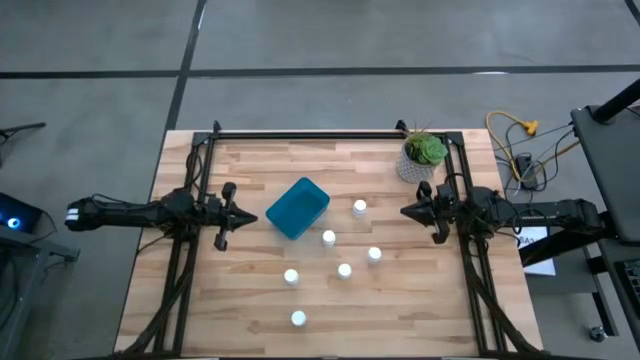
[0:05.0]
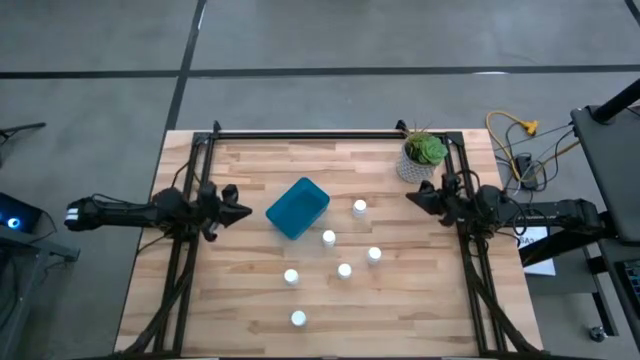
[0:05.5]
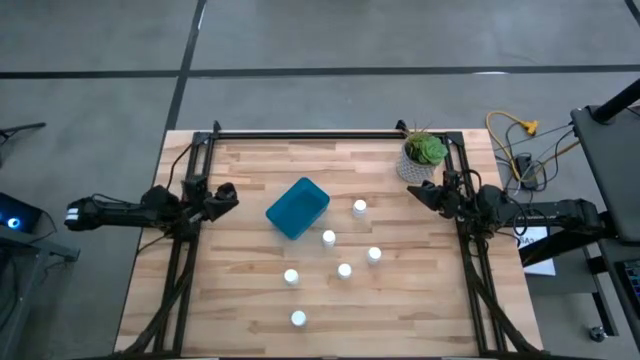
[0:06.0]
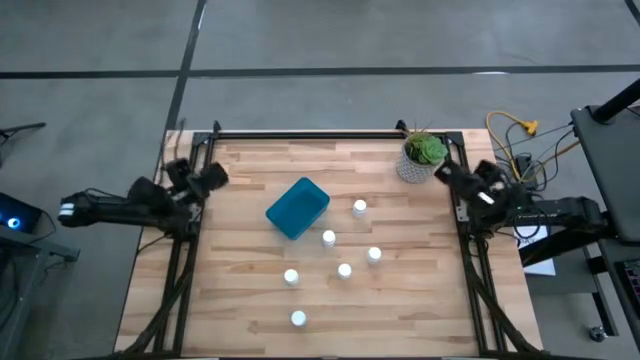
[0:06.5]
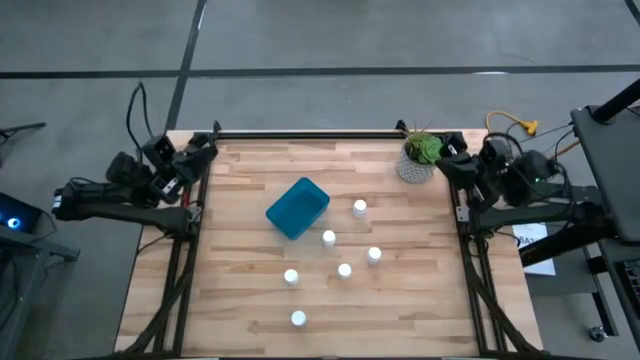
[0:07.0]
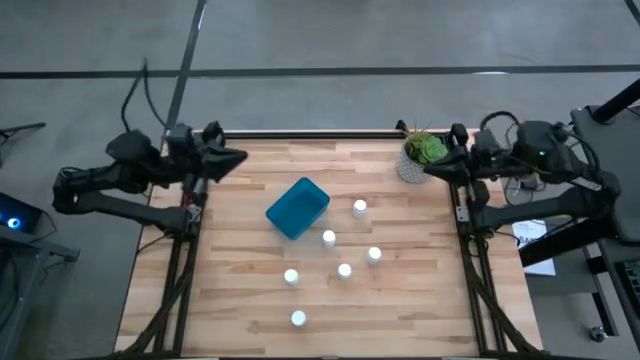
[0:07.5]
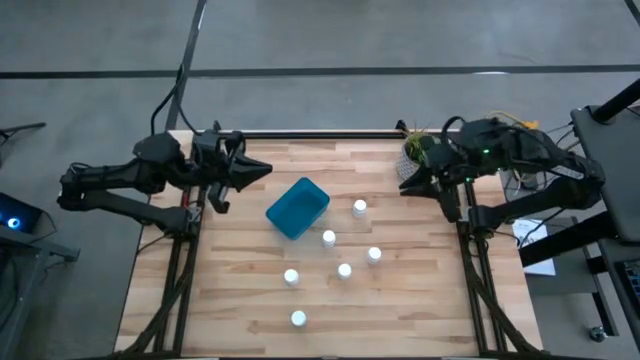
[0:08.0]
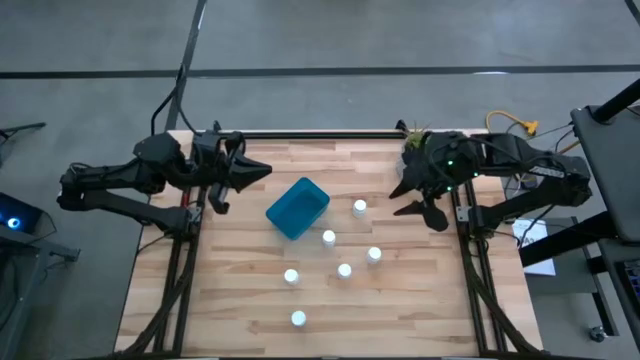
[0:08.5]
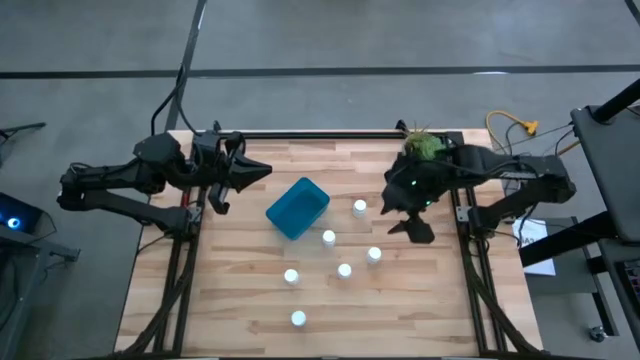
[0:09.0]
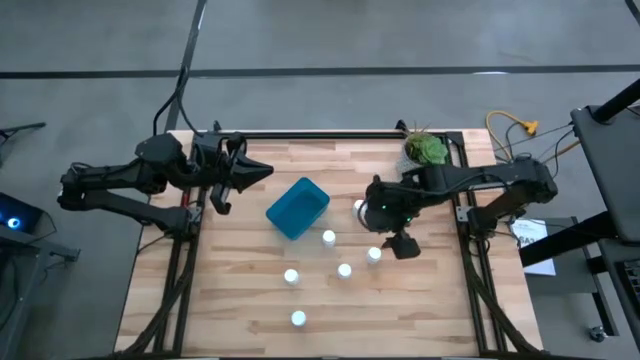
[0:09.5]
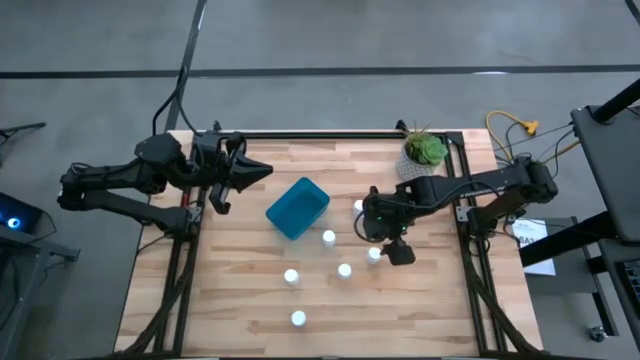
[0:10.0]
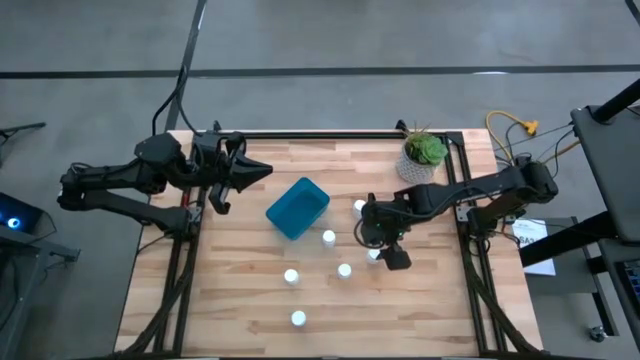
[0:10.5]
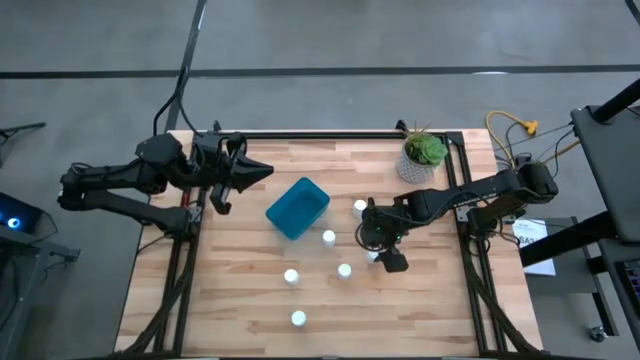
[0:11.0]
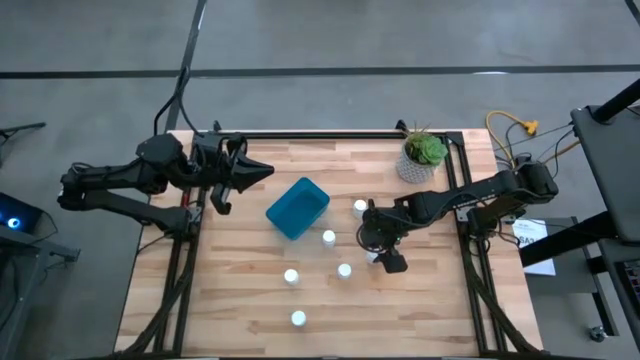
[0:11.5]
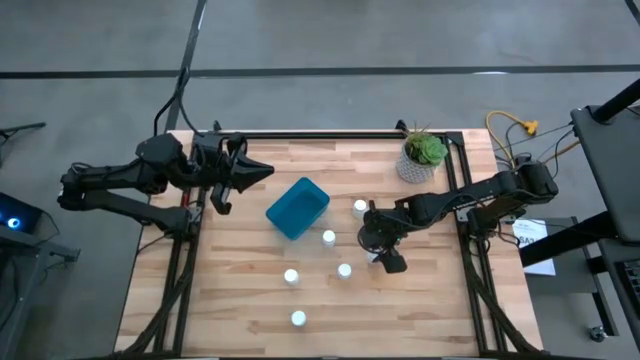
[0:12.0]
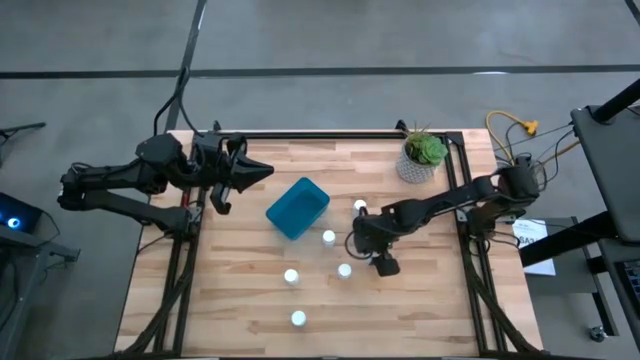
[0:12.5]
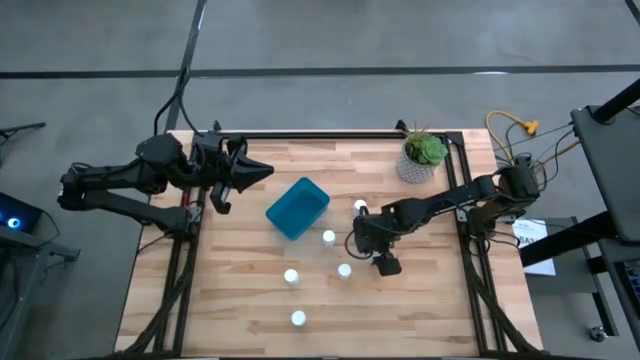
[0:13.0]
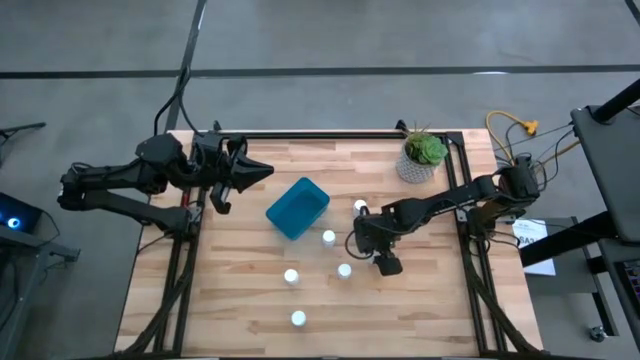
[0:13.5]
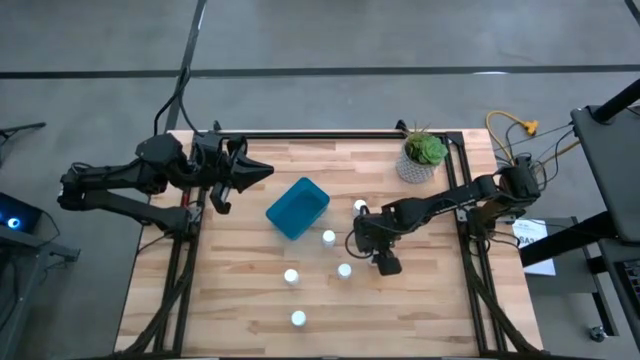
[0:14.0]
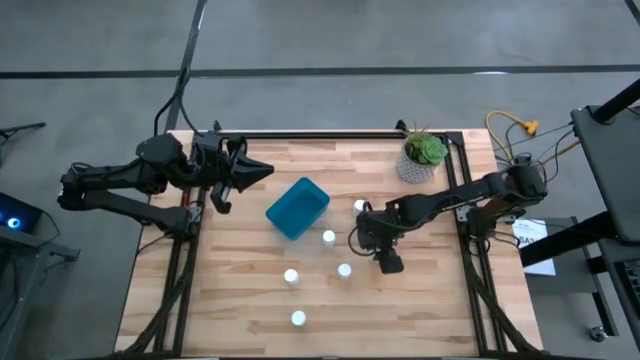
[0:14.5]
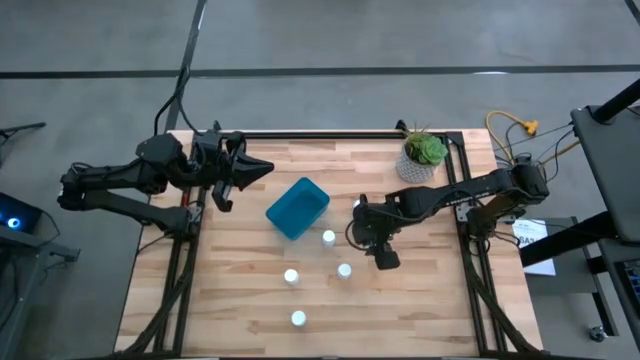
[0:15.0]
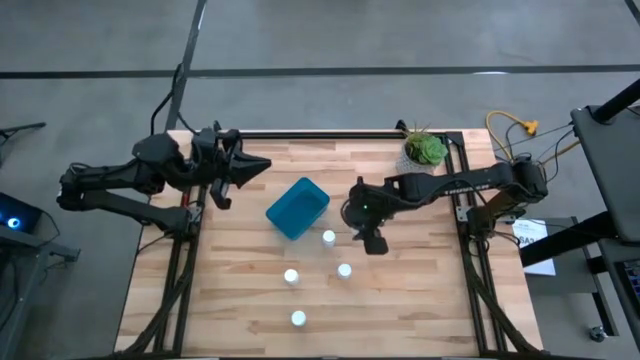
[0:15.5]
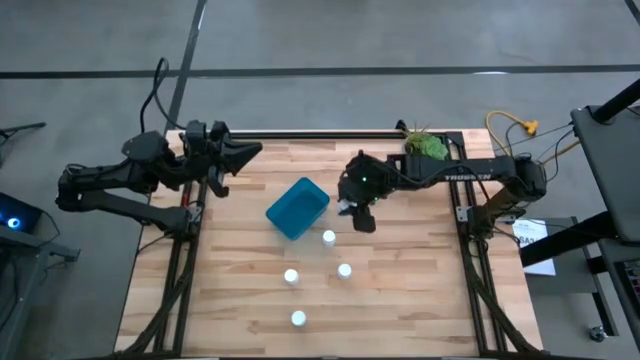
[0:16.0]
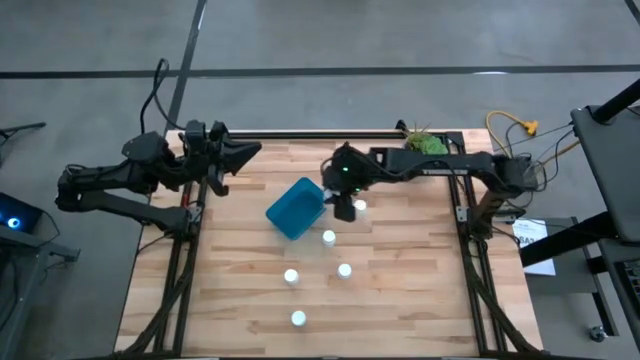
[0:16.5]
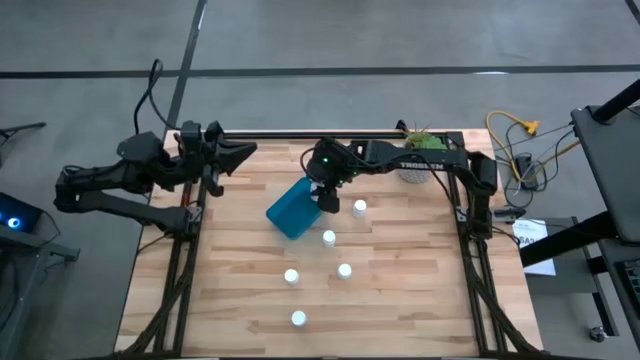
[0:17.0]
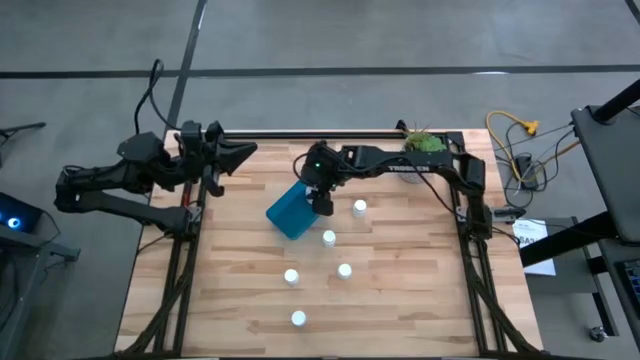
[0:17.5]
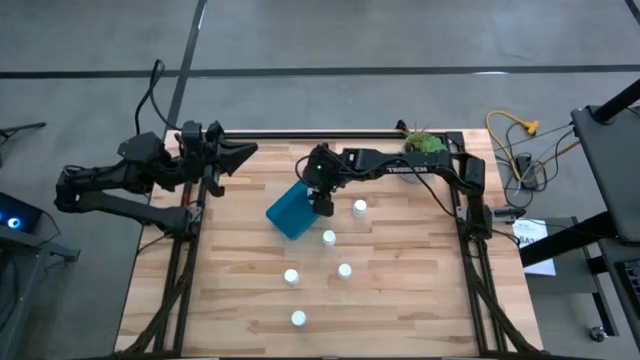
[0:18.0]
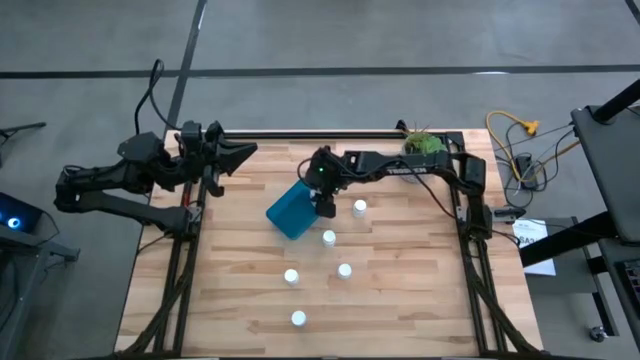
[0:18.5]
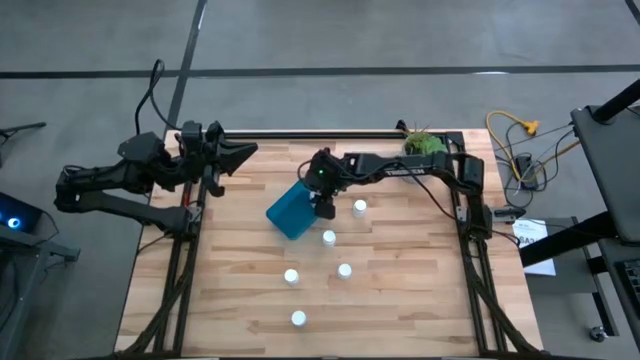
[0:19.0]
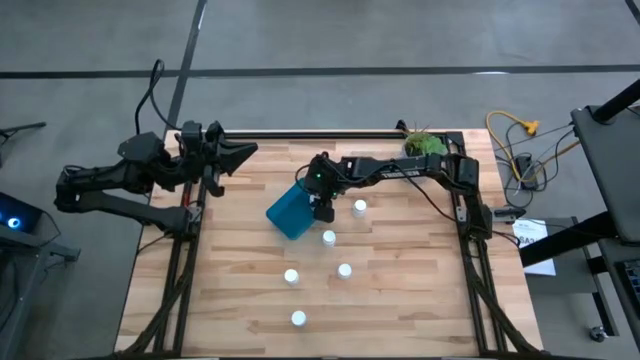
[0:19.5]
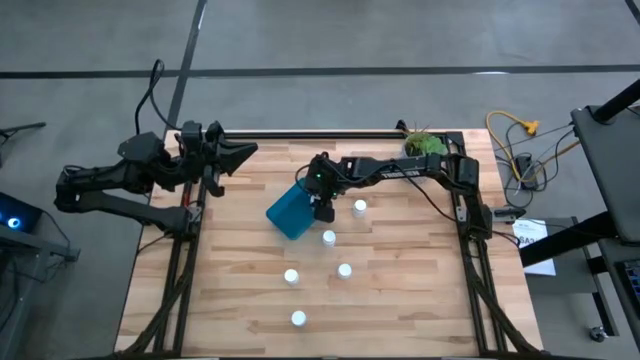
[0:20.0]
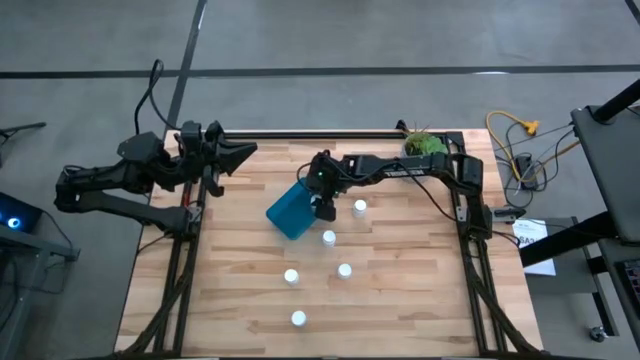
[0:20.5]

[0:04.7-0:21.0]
Task: Pick and place pill bottles into a basket
Put the right white pill bottle into the blue container

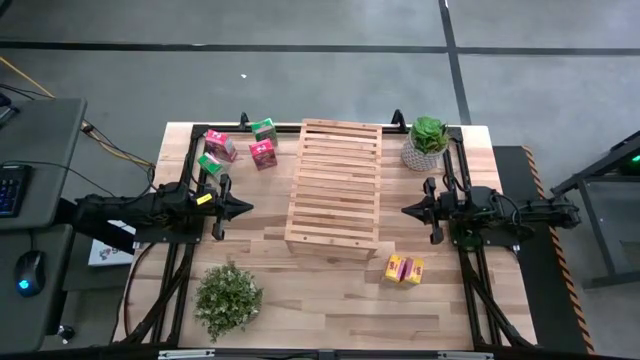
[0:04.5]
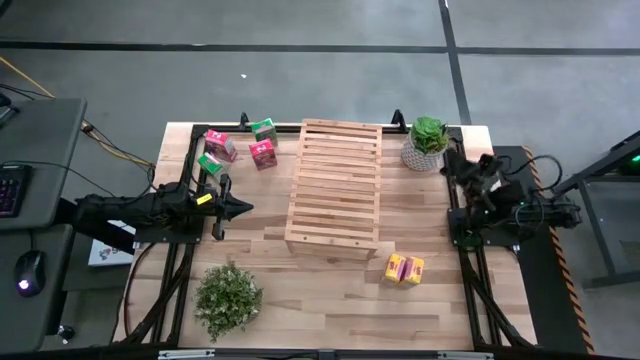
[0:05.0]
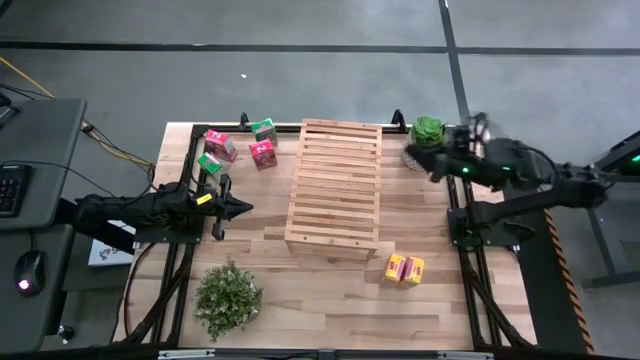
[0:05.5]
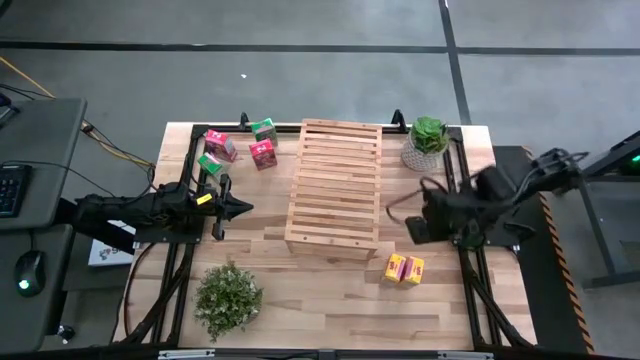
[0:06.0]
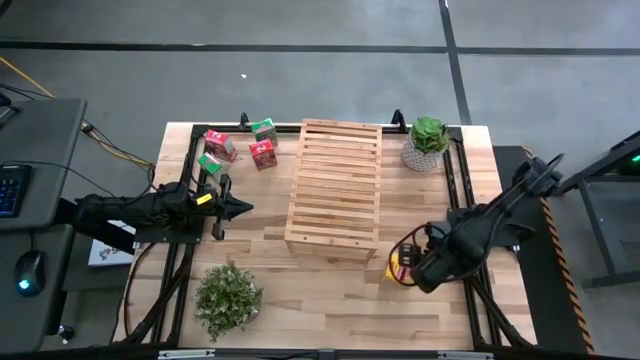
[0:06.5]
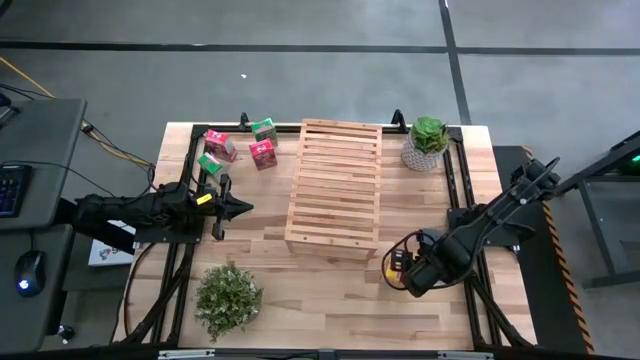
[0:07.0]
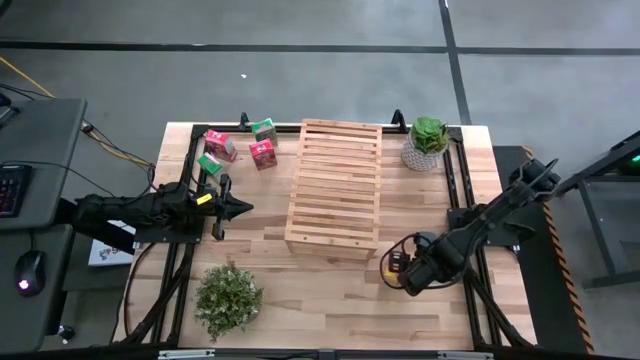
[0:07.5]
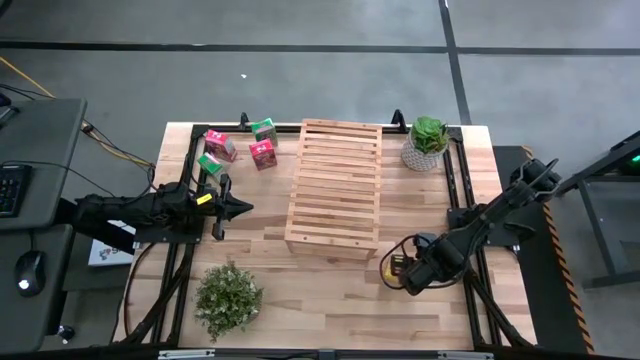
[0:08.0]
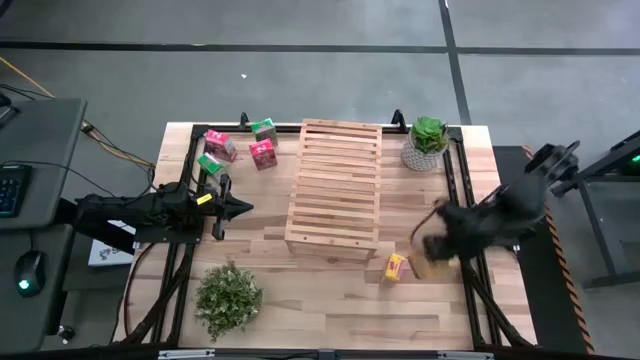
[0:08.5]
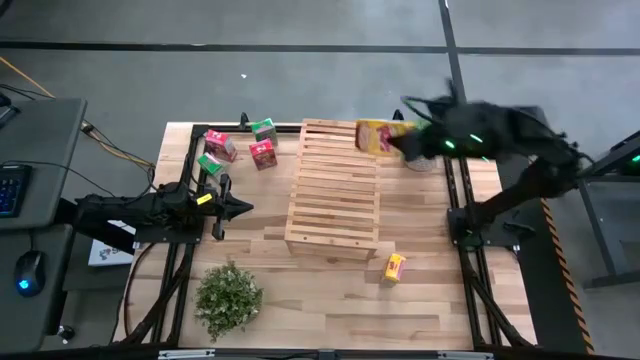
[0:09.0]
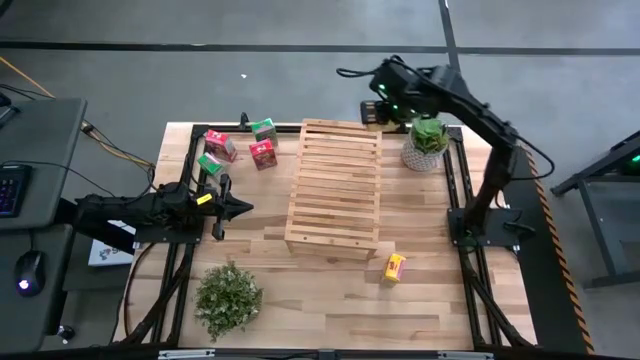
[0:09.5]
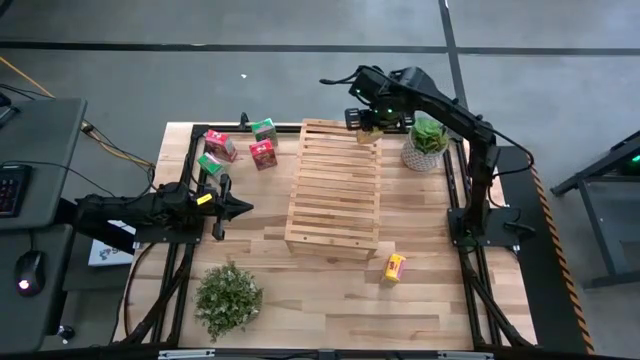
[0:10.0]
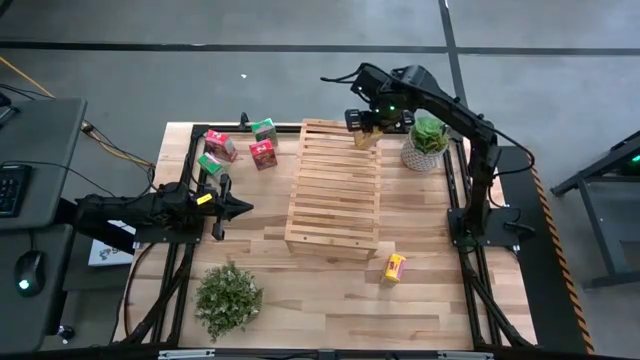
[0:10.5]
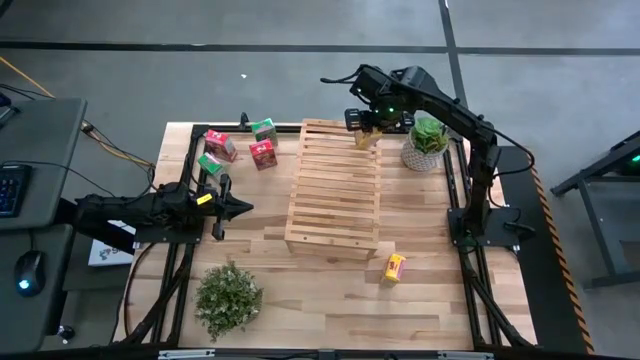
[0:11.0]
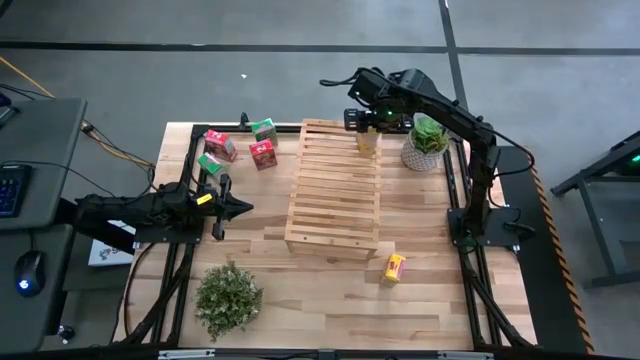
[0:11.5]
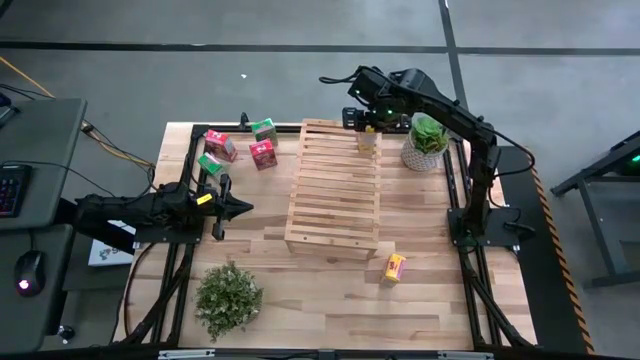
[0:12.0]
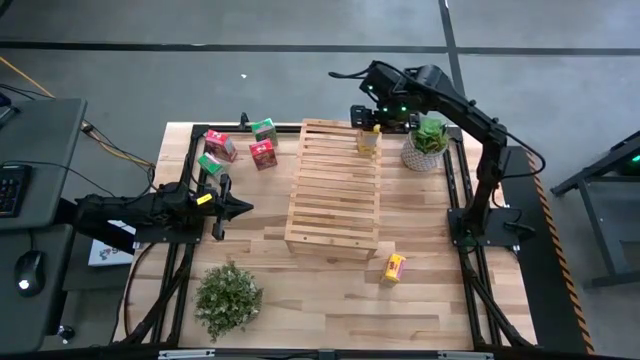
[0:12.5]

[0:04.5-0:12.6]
Task: Stack cereal on shelf
Put the right yellow cereal box on the shelf
